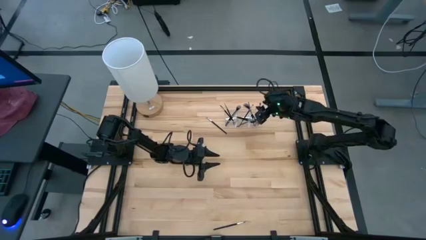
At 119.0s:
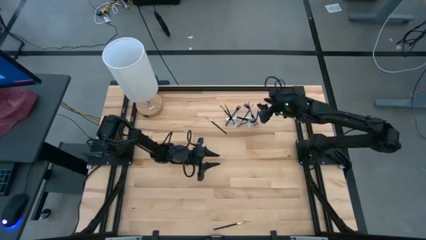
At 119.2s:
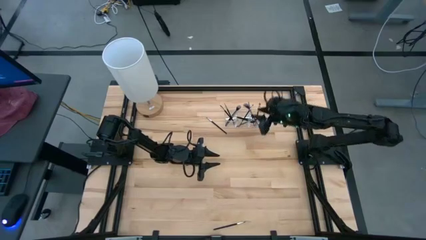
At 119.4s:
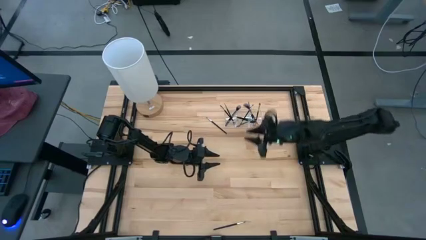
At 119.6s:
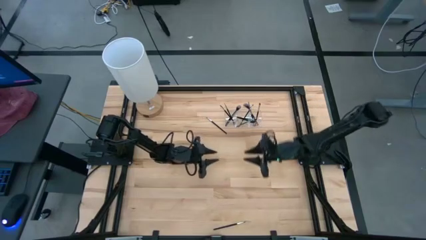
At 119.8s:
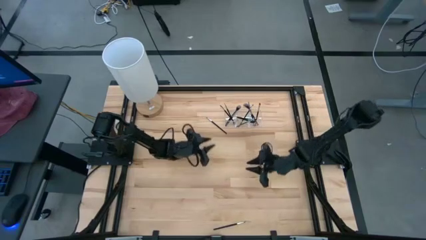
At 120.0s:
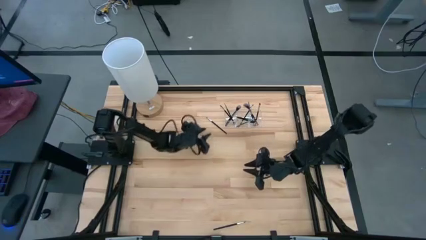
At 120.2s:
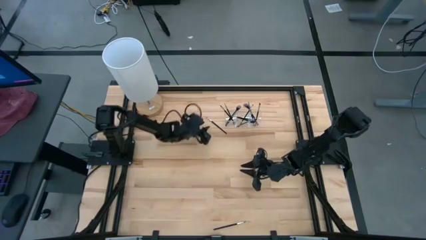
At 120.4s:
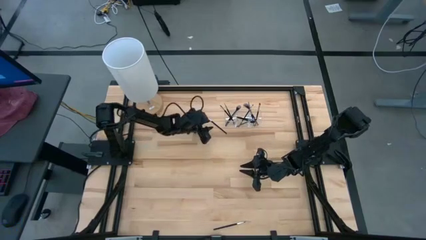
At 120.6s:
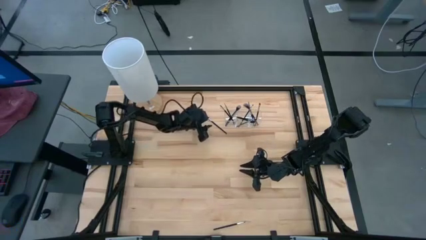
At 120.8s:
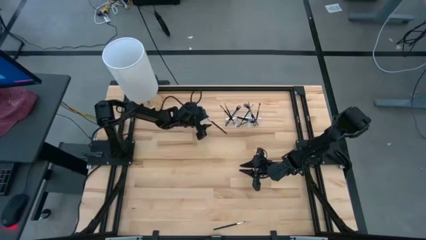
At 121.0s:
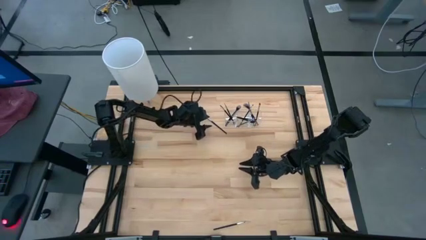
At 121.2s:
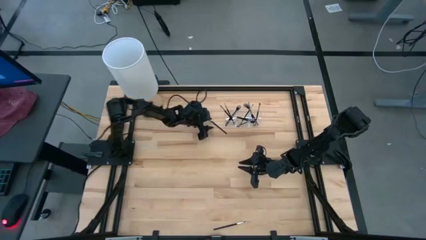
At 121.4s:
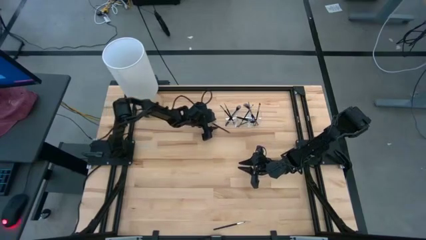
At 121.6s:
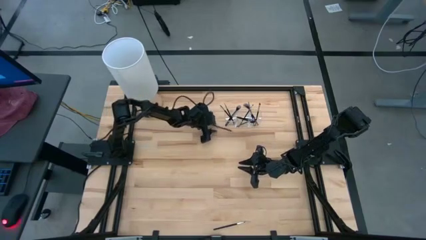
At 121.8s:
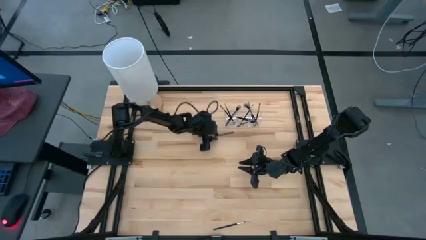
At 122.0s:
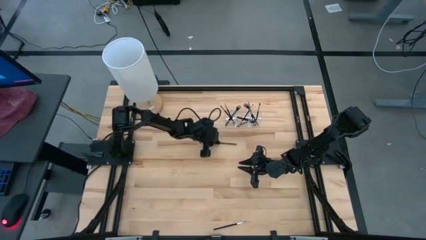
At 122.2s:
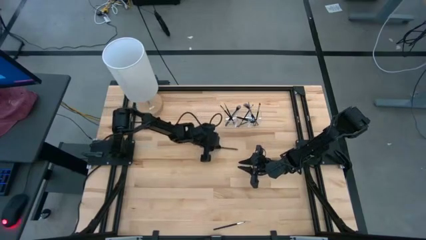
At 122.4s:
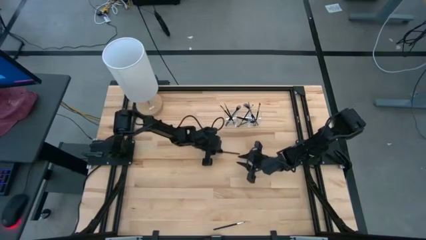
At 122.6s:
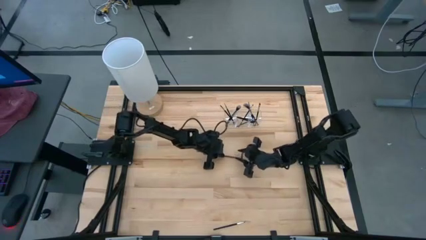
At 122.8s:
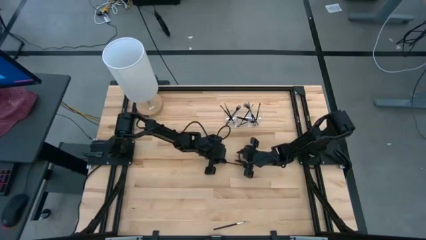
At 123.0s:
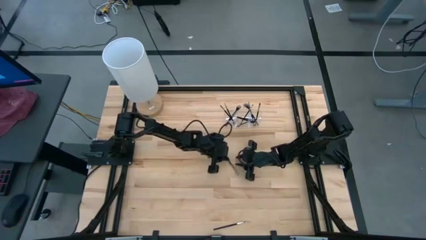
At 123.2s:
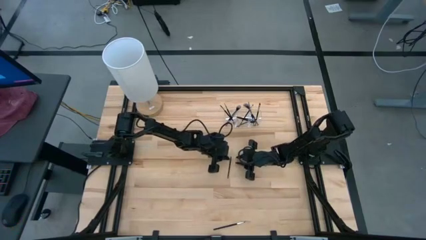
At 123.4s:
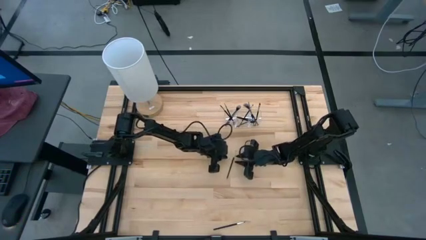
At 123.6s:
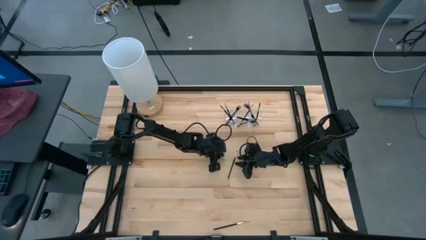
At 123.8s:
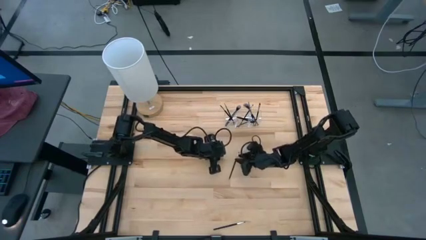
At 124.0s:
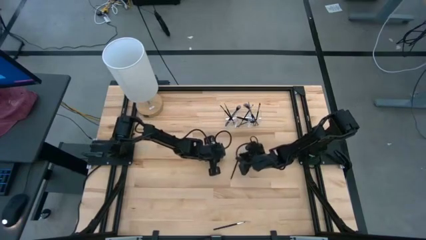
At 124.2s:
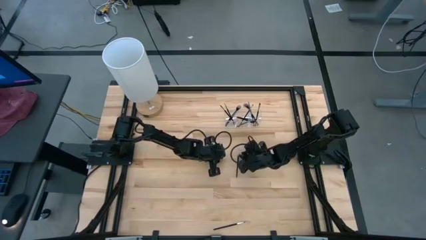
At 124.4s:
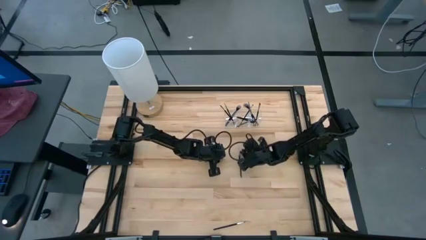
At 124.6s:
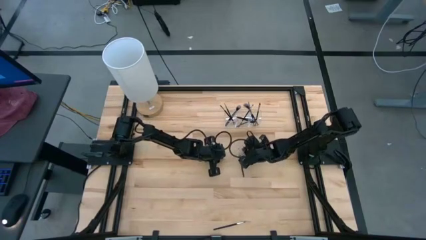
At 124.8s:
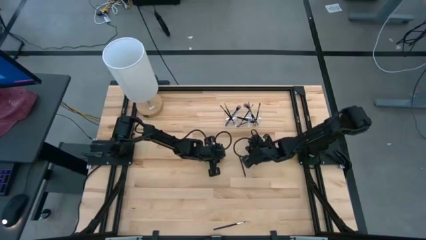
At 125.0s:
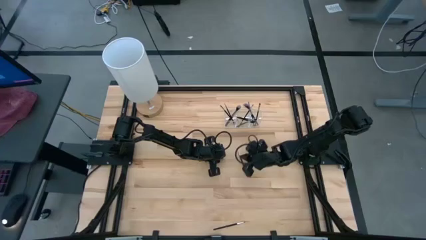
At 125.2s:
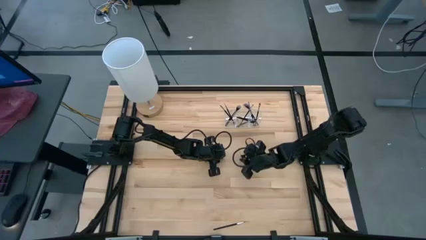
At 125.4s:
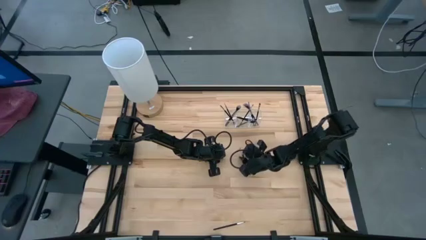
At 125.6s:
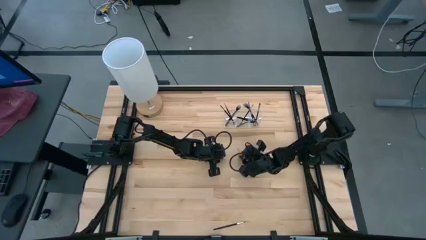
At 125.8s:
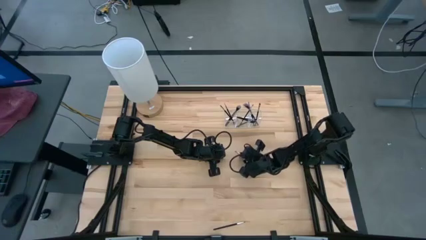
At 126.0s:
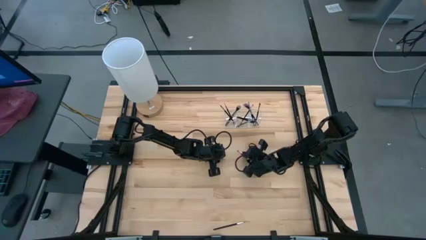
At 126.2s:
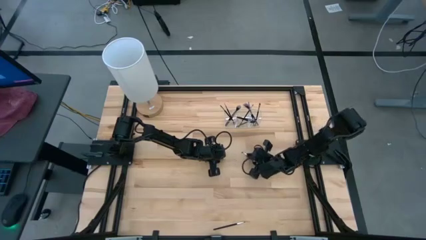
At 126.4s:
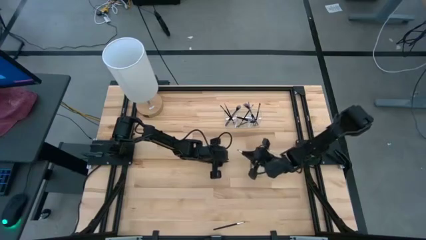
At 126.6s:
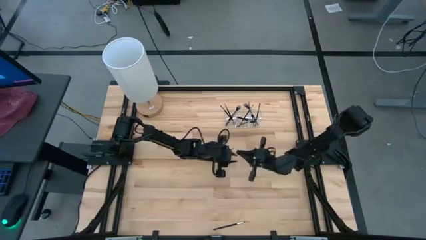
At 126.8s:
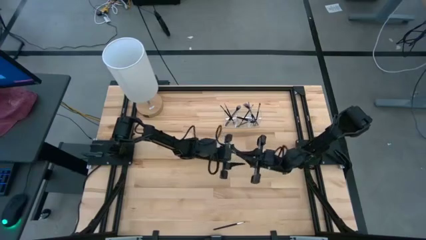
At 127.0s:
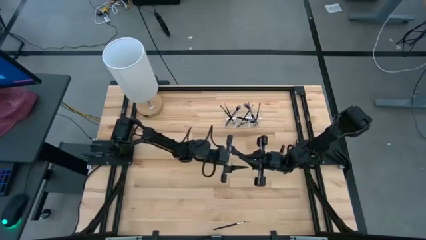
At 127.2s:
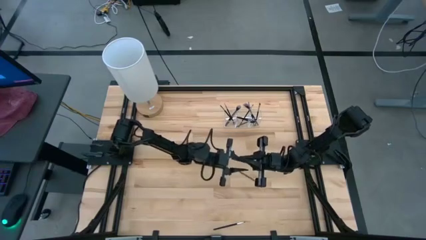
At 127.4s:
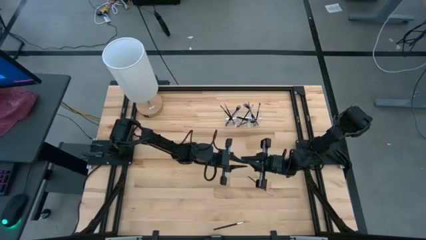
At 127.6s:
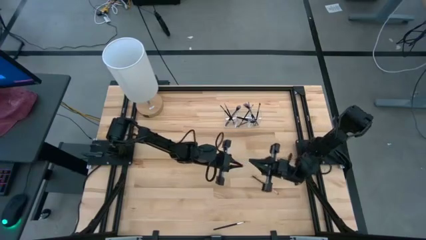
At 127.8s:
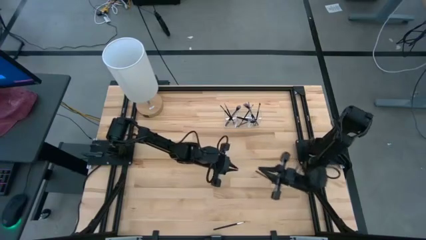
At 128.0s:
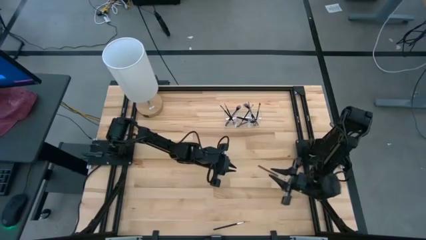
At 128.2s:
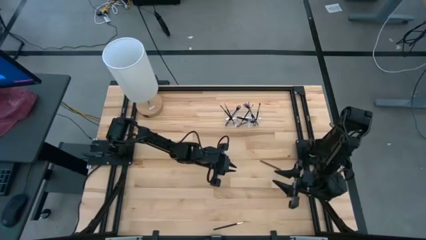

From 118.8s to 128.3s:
Task: Put items in baskets/containers
Put the black eyeshadow brush into the transparent organizer
